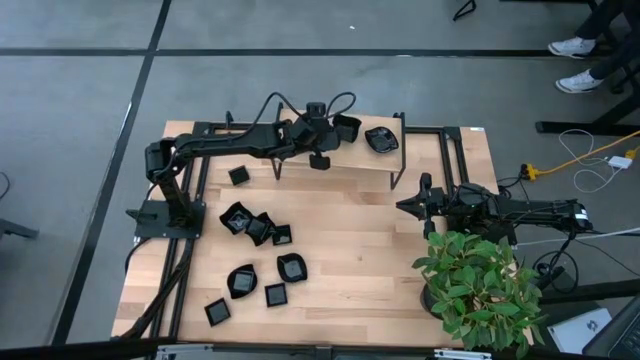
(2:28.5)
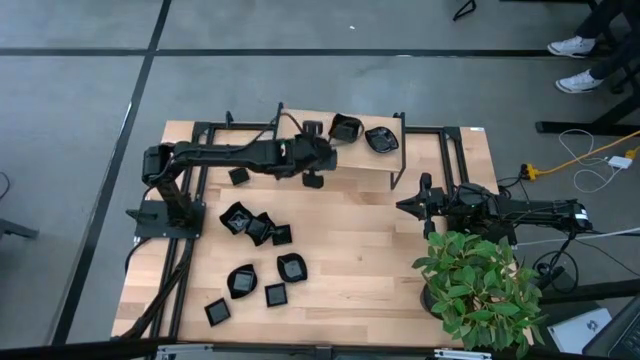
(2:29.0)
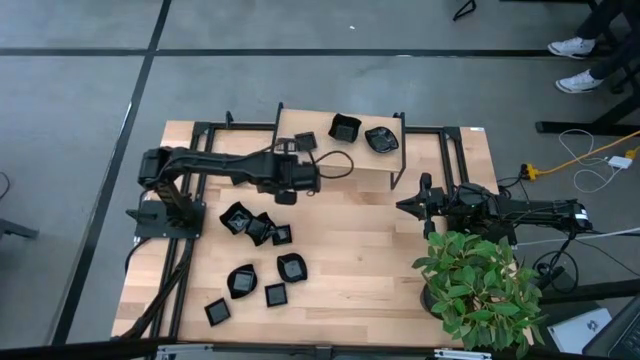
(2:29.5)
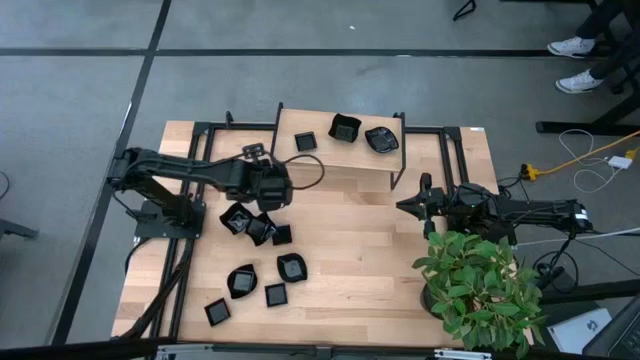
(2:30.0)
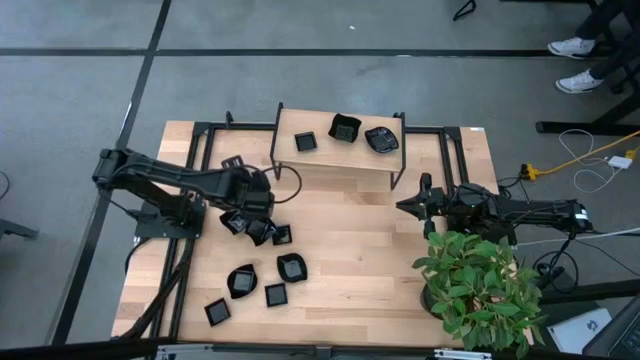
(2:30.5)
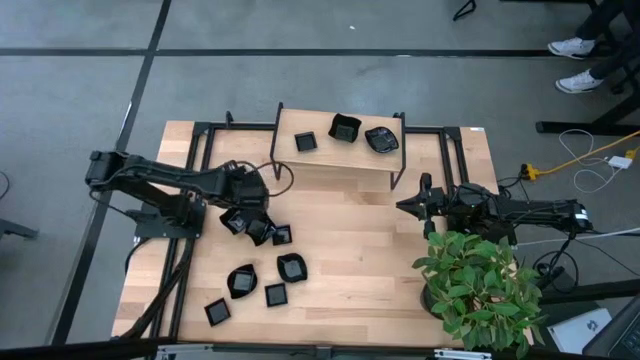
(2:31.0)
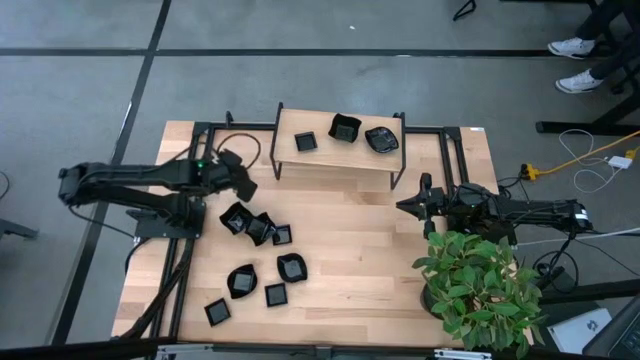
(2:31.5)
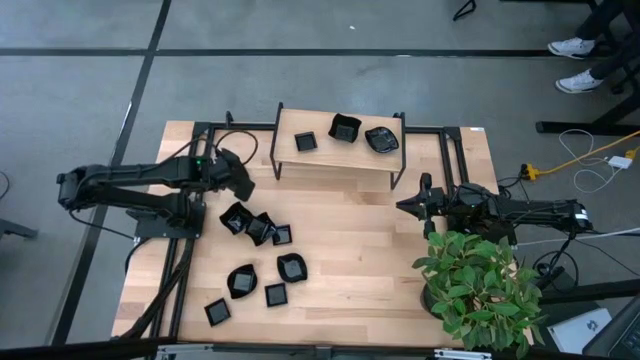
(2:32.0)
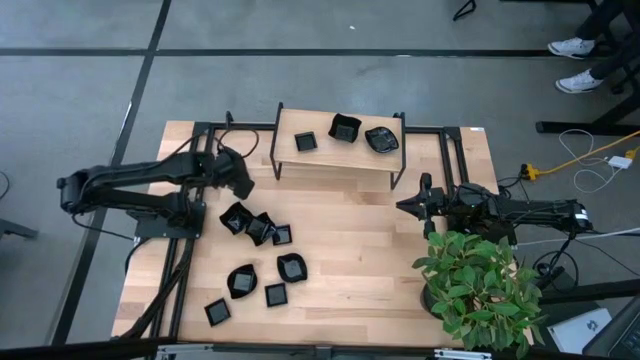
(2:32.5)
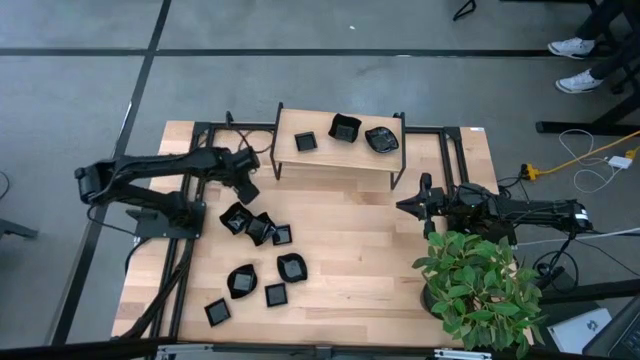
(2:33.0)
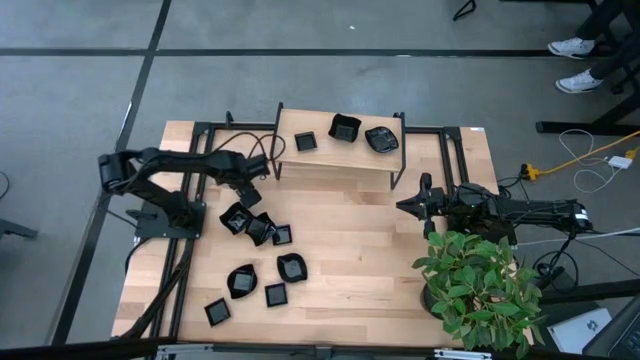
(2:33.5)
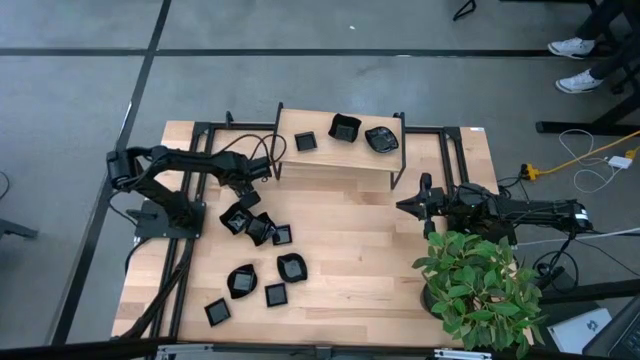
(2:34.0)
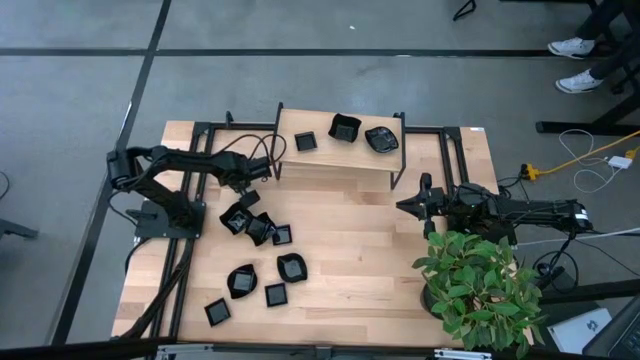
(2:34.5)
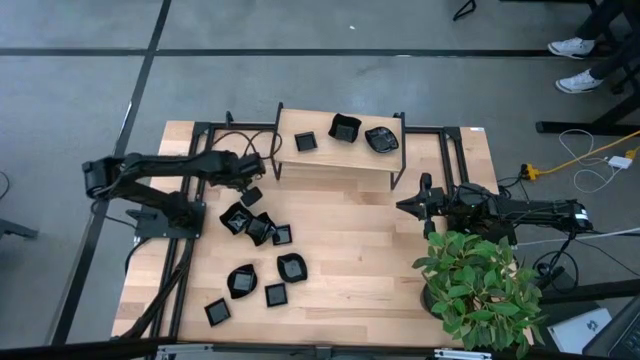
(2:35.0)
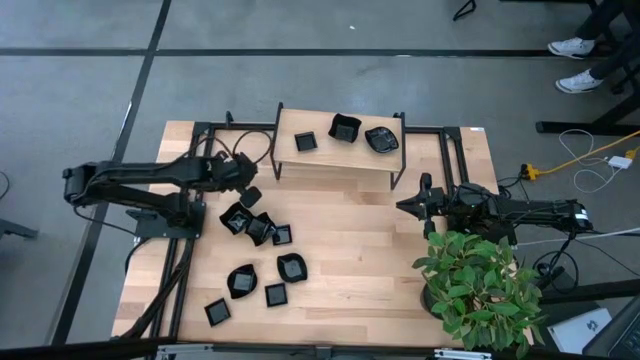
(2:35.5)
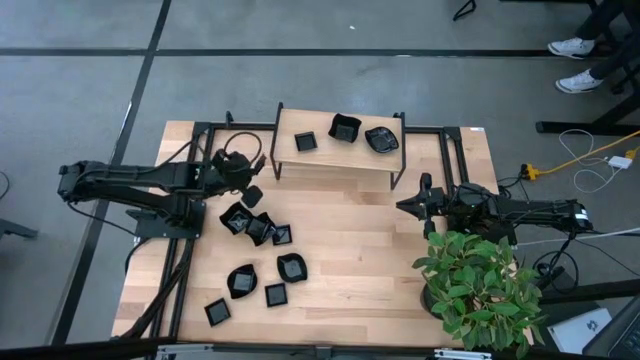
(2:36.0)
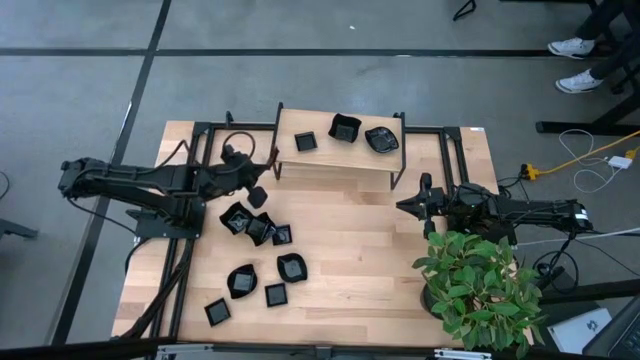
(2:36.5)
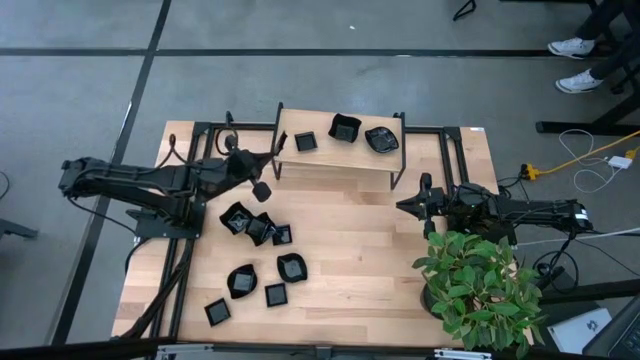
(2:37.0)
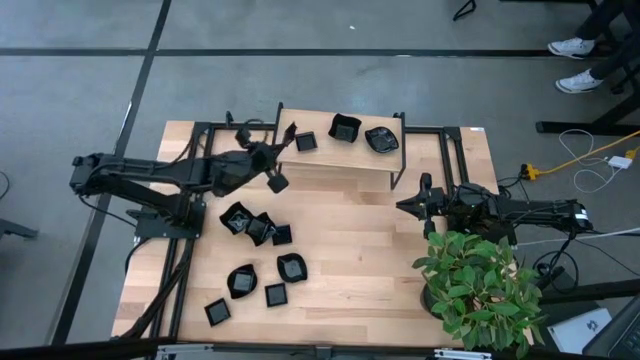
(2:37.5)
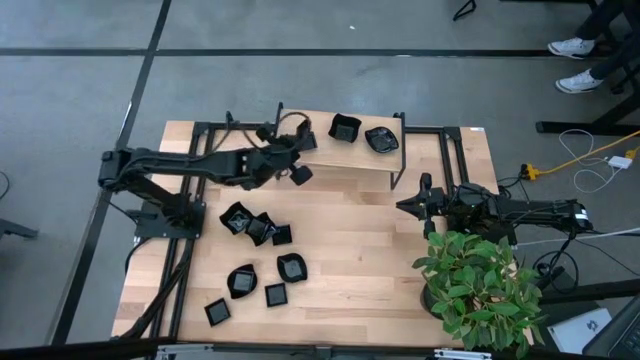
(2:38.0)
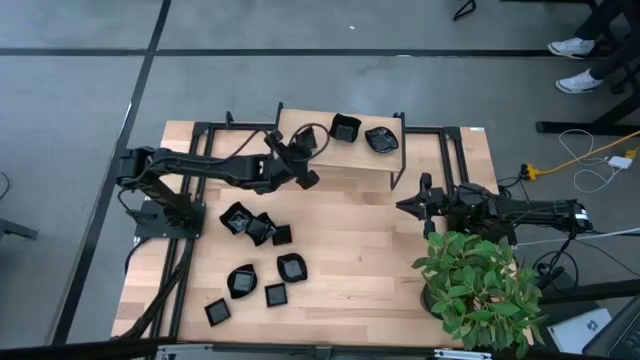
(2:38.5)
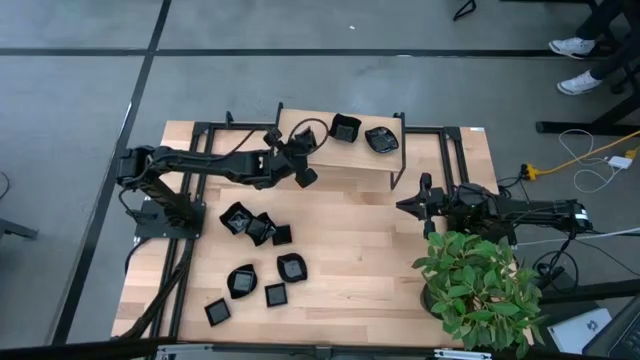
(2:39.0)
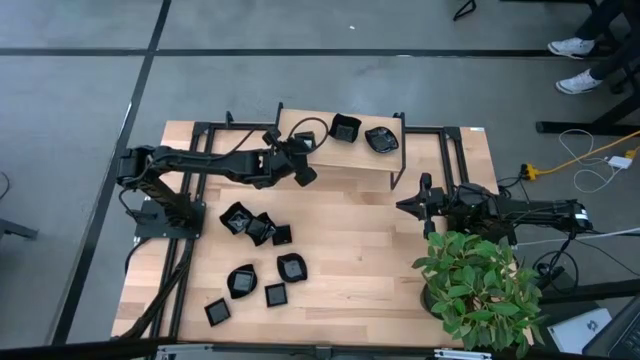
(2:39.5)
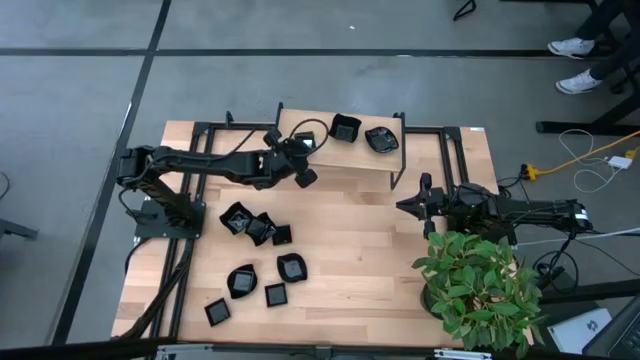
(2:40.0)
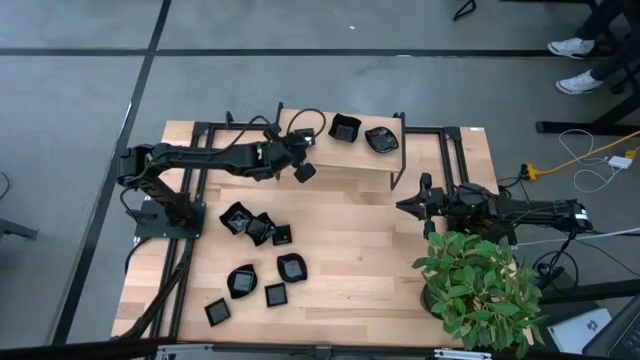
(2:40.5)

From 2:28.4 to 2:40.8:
Task: Pick & Place Mini shaped plates
Stack the square plate on top of the square plate on the shelf

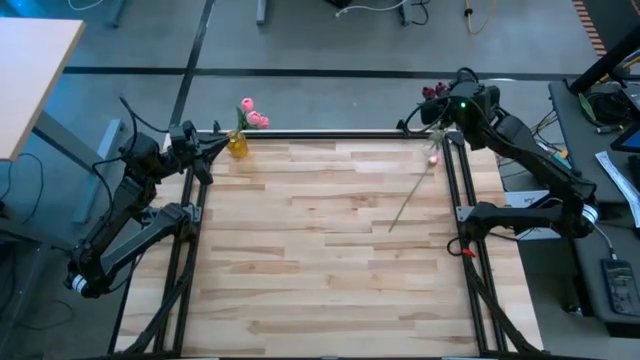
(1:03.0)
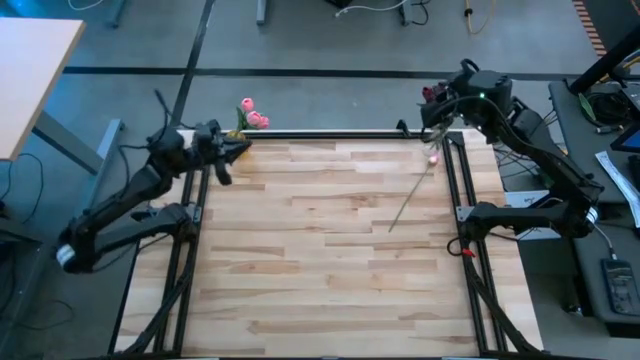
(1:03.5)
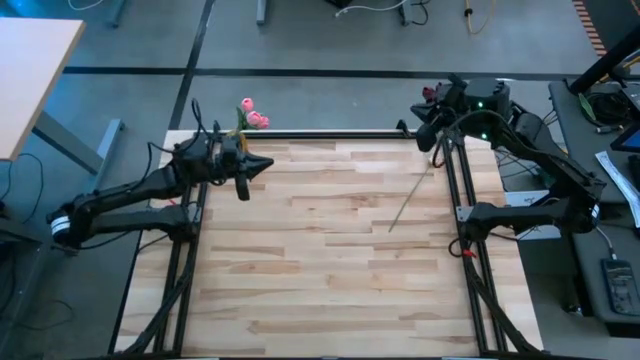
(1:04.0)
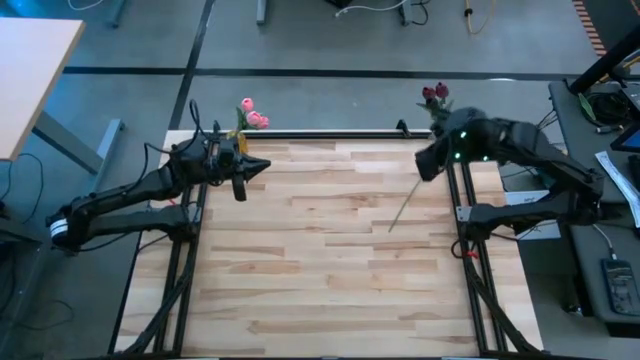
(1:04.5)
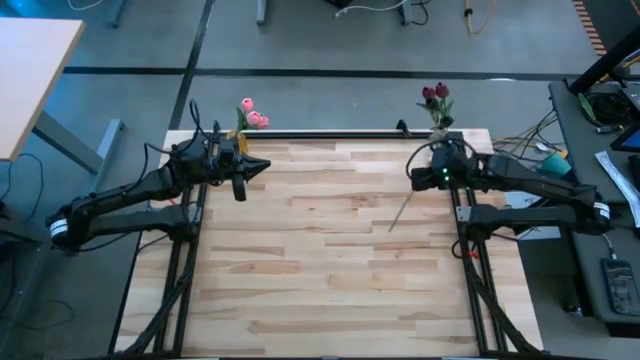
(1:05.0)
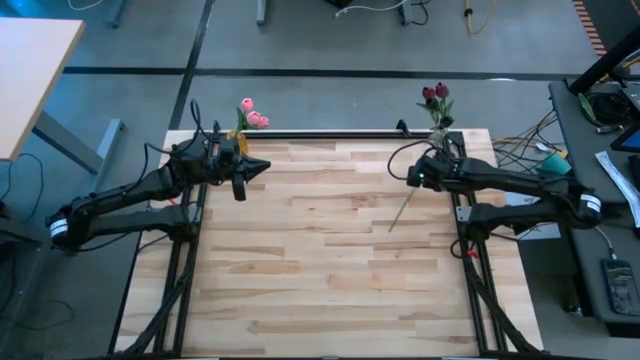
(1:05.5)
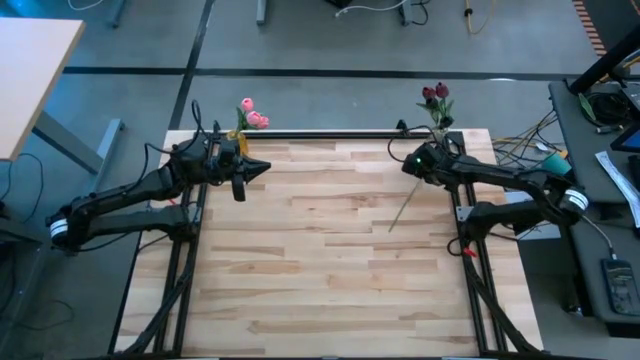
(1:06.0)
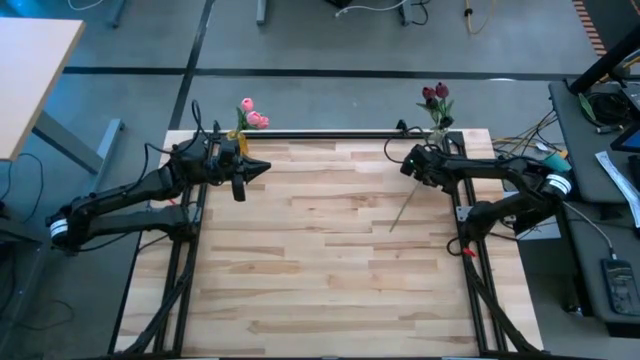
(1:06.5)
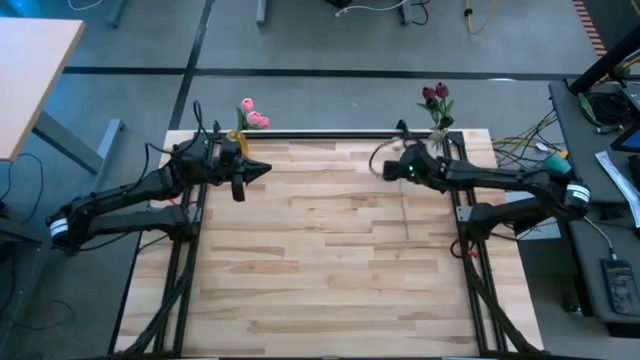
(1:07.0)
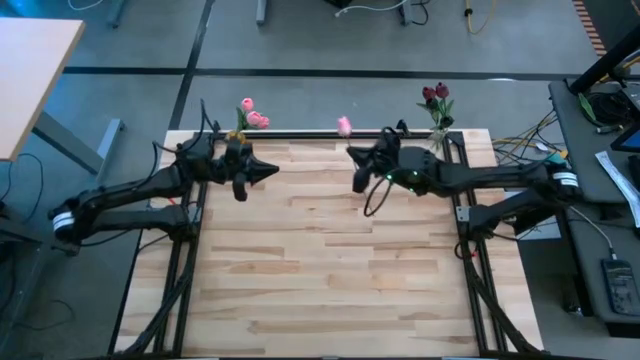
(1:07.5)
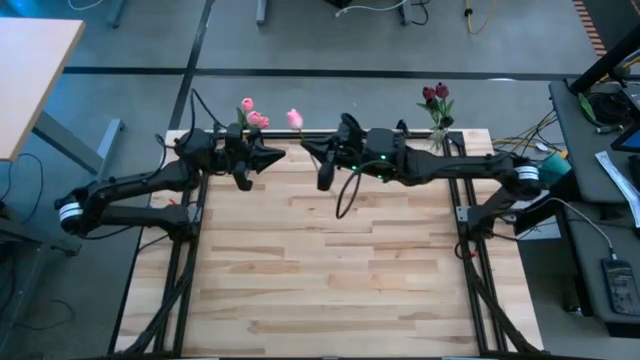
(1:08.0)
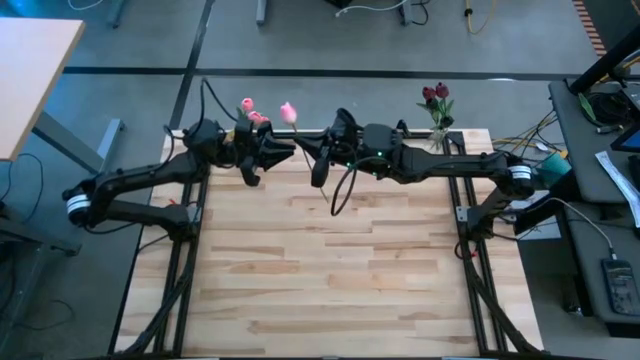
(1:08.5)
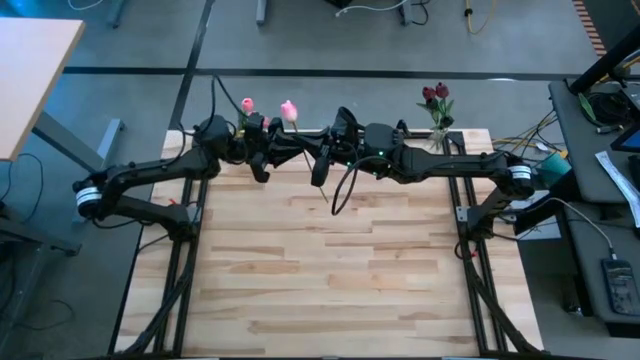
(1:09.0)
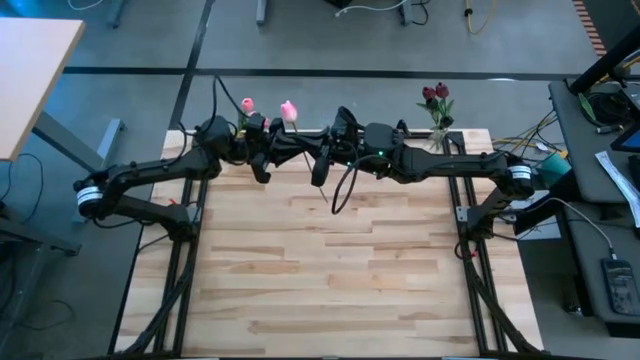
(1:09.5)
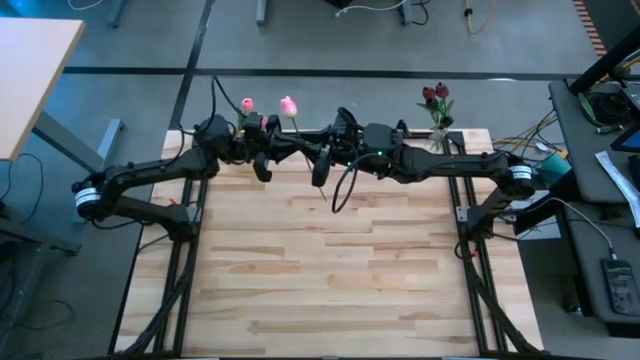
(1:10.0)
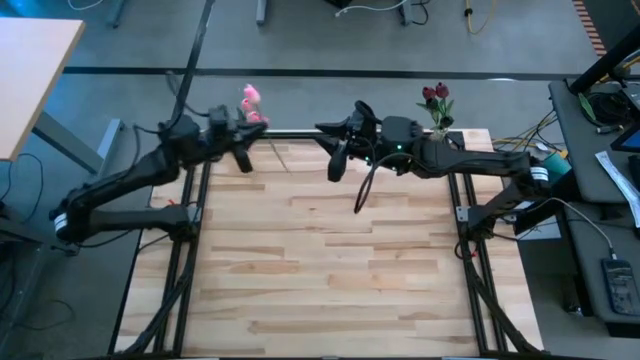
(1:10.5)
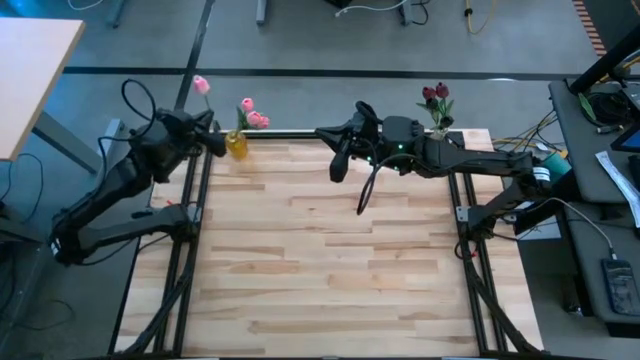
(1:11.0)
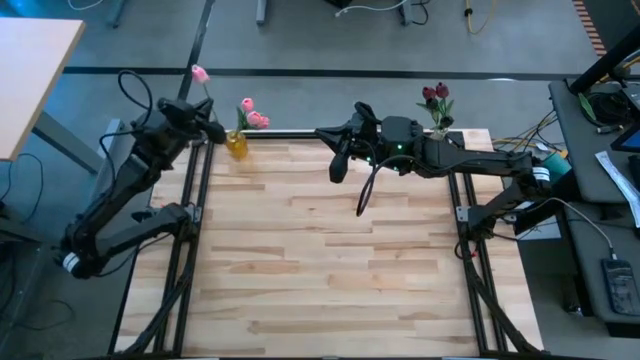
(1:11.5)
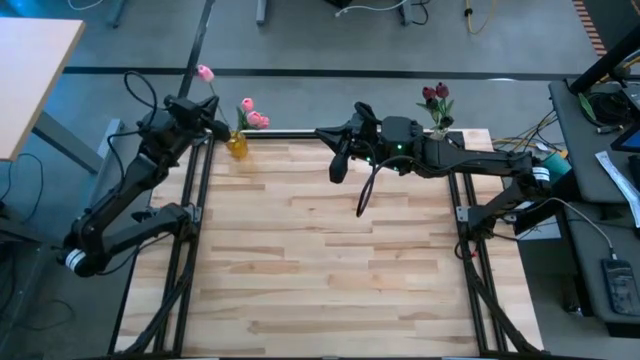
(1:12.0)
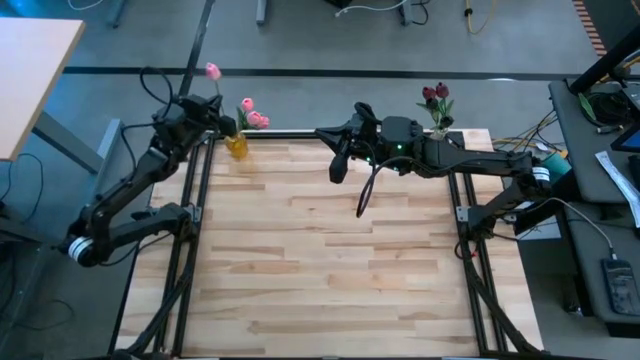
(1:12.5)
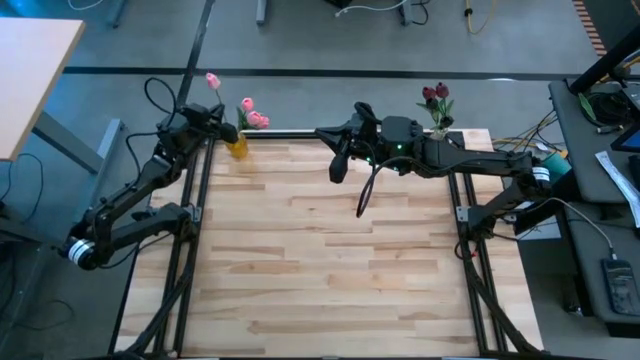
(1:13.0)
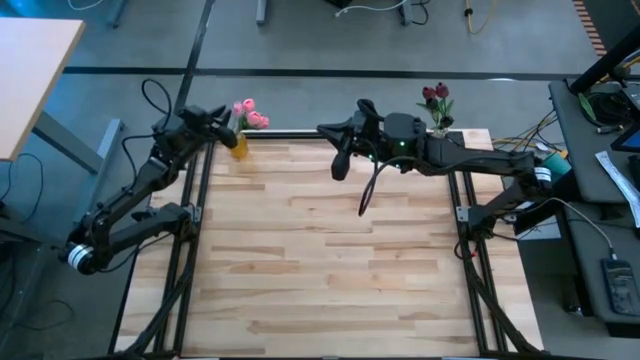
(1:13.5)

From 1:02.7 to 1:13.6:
Task: Sort flowers into vase by color
Put the pink tulip into the yellow vase
